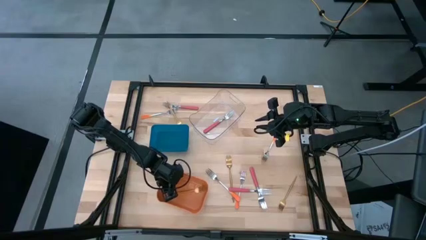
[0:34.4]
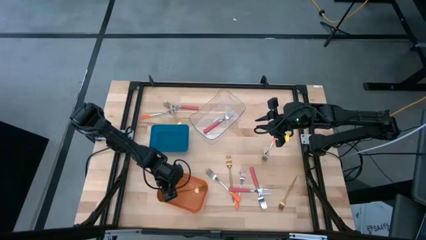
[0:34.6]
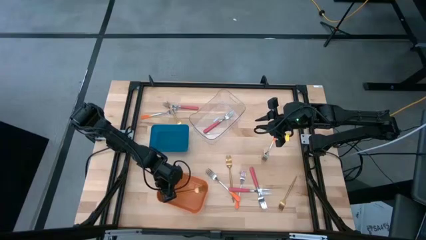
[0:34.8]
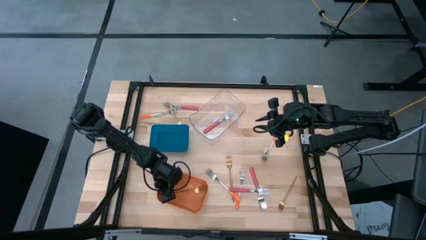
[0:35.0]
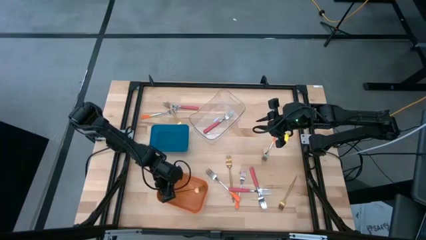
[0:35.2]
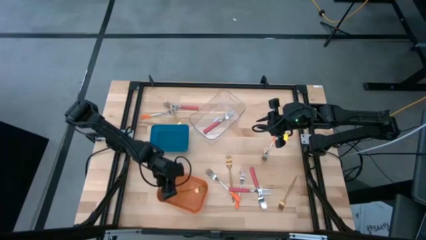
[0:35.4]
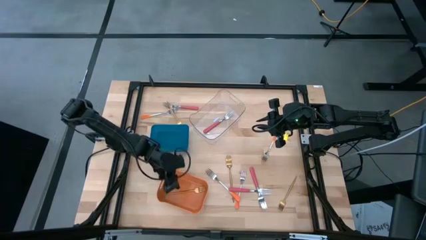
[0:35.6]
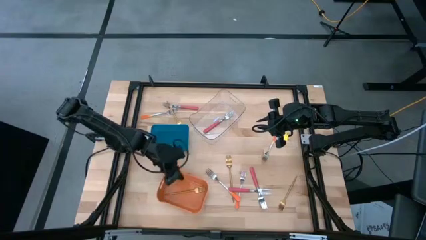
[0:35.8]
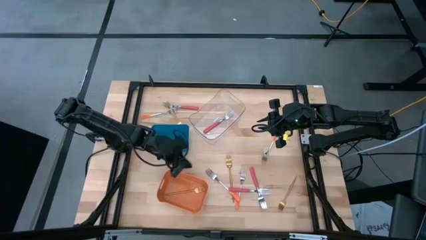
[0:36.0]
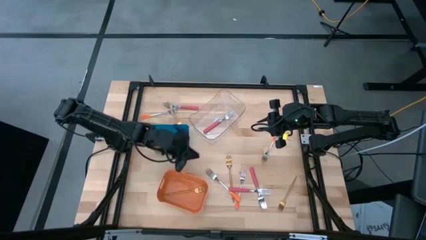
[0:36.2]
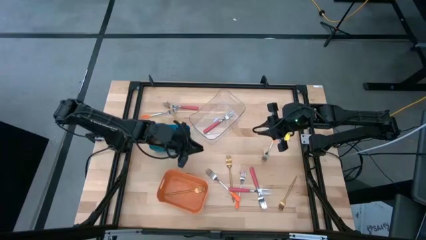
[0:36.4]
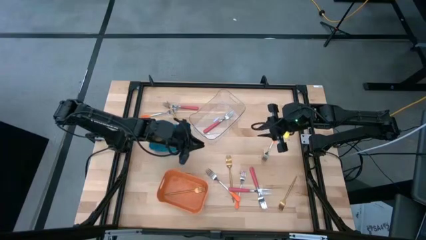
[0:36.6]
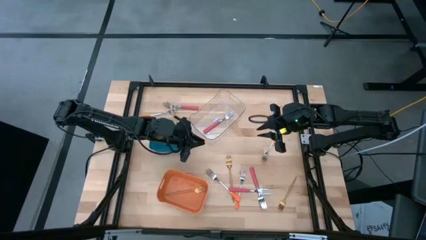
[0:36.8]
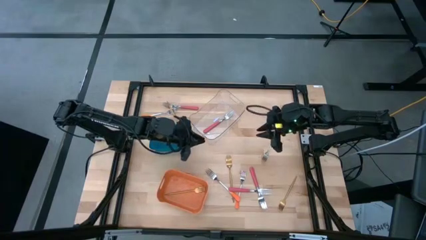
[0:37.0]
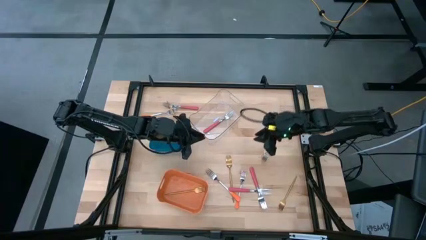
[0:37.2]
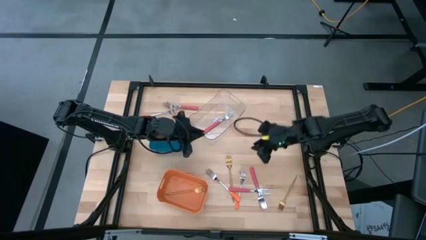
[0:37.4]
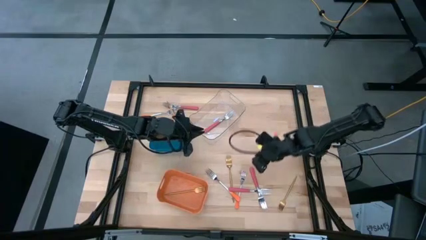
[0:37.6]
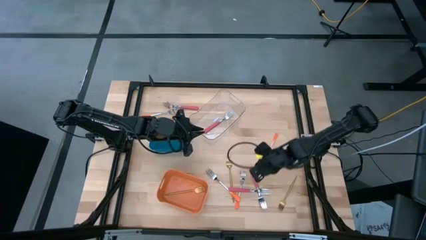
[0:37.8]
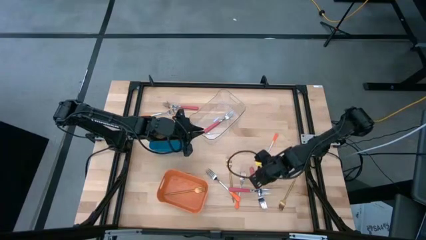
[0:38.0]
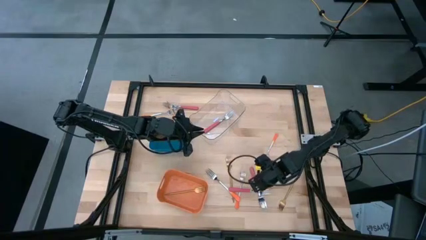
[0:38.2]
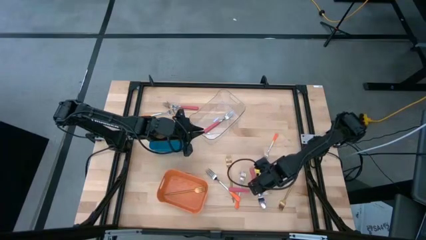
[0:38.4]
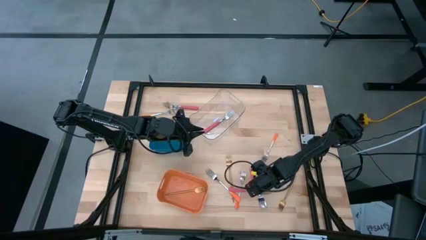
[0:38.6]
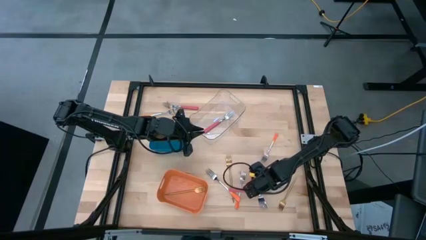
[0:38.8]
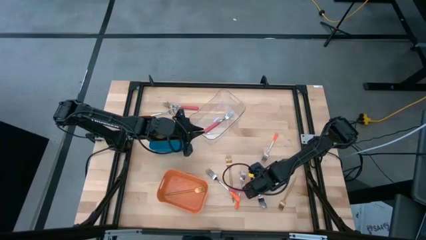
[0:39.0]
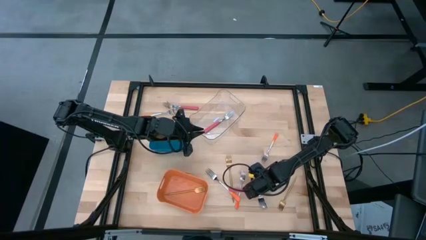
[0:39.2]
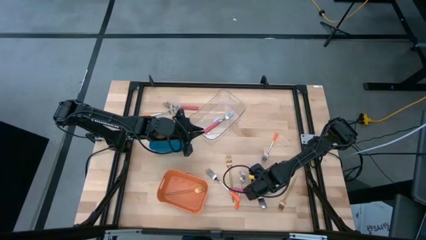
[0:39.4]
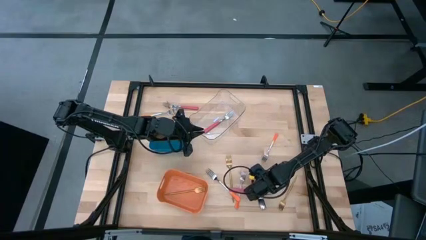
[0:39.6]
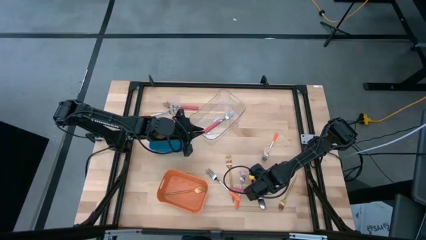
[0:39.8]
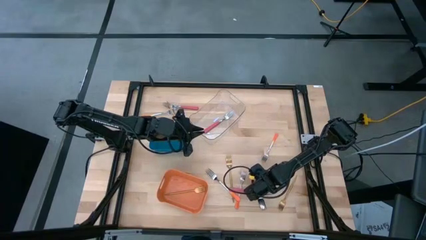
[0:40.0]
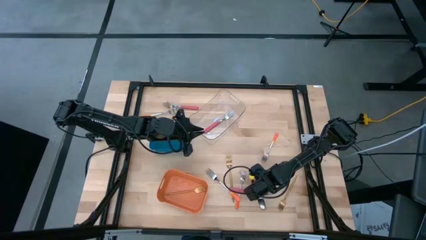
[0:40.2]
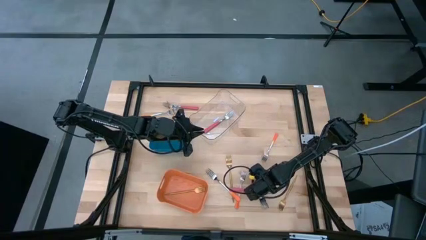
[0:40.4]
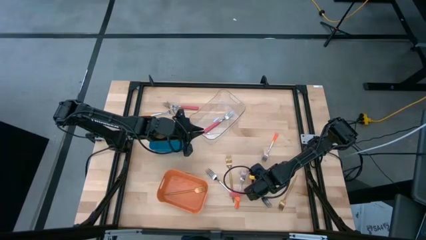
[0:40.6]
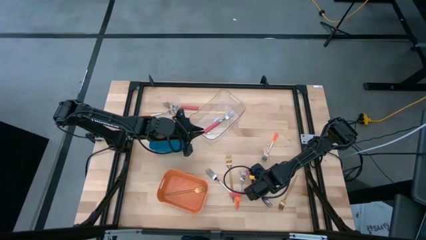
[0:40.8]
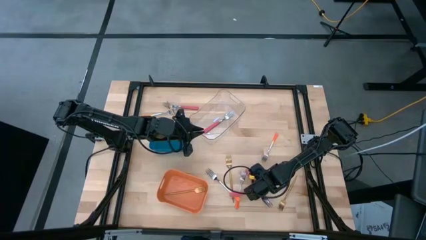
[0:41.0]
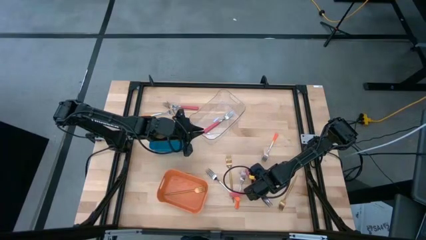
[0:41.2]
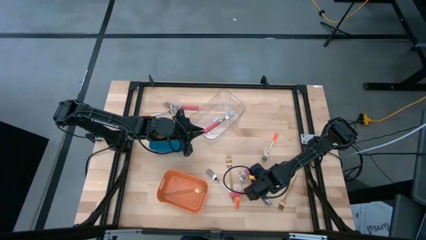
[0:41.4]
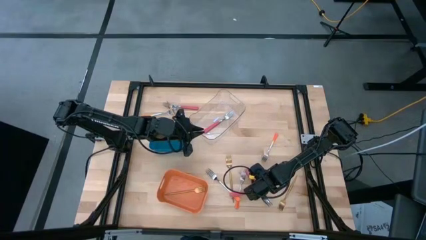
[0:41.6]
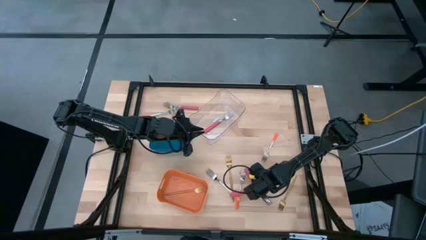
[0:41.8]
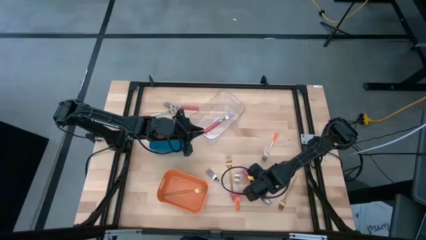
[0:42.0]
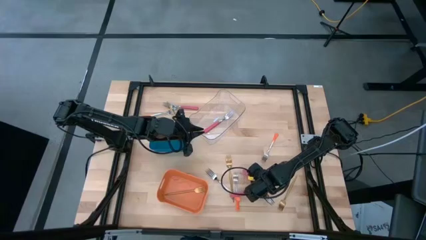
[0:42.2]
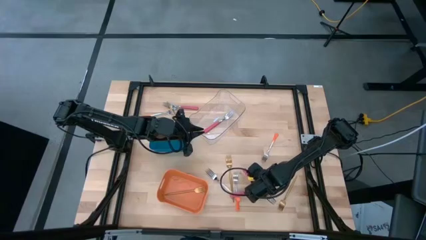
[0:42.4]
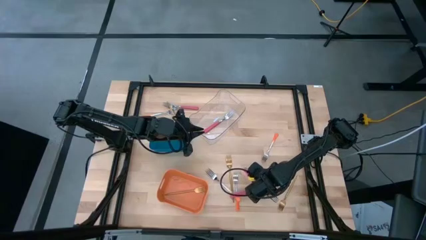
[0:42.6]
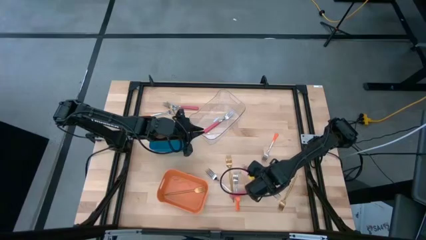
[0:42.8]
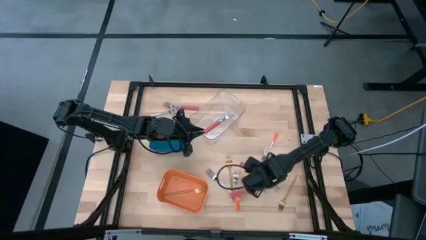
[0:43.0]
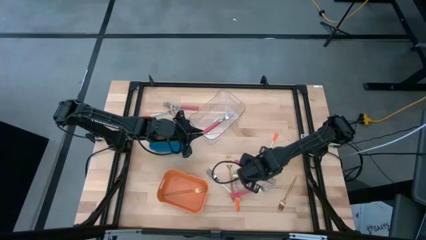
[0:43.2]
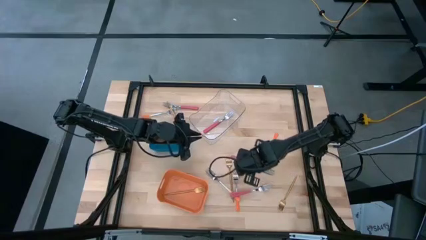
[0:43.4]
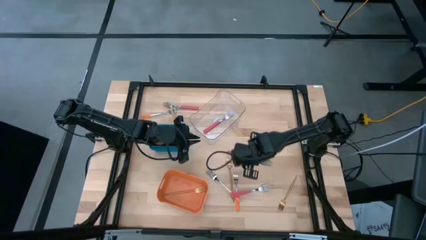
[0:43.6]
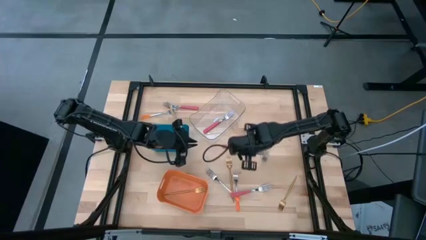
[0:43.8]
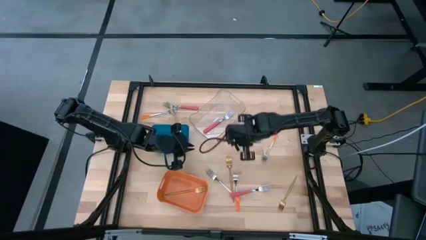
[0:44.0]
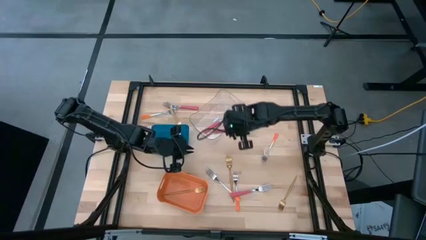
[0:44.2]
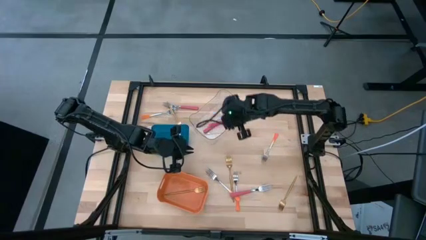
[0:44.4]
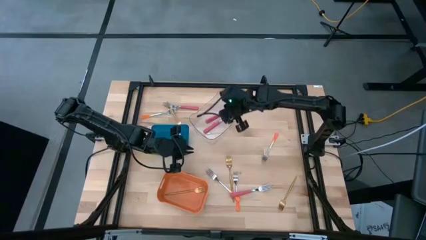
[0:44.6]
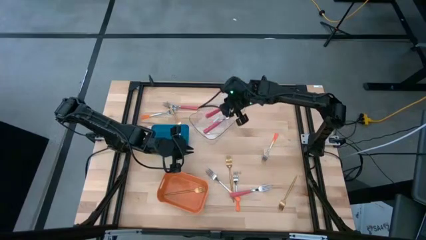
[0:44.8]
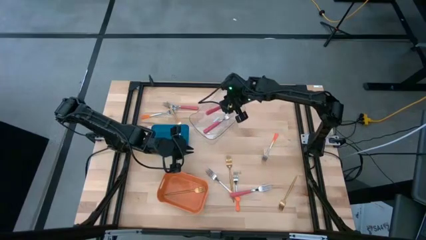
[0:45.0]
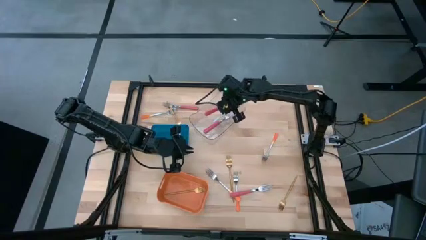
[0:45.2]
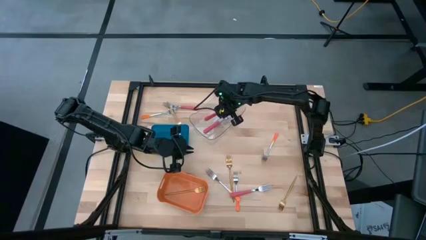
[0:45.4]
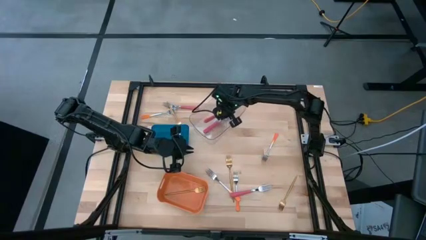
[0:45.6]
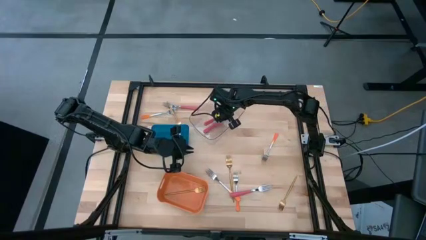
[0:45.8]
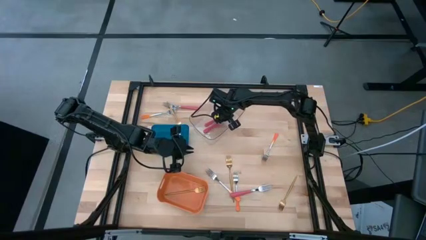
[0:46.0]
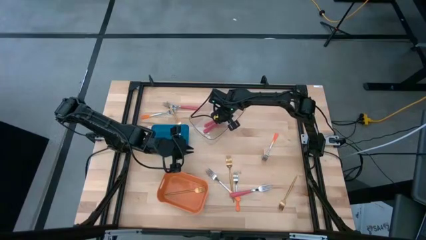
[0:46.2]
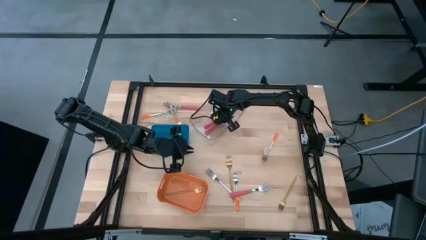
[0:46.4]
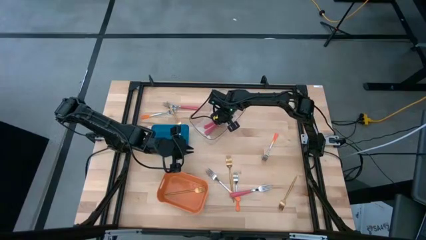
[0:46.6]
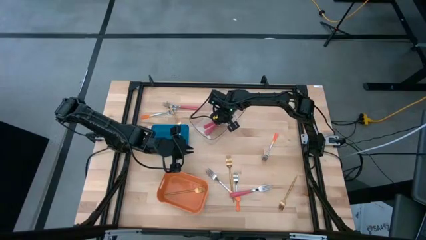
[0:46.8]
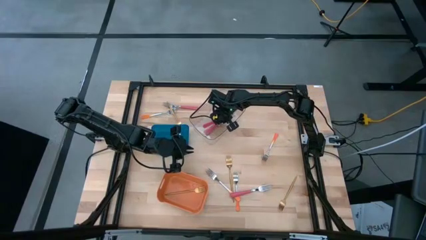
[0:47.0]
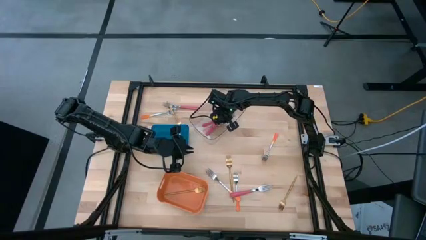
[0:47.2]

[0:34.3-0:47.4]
Task: Sort silverware by color (type)
Put the pink fork into the transparent bin
